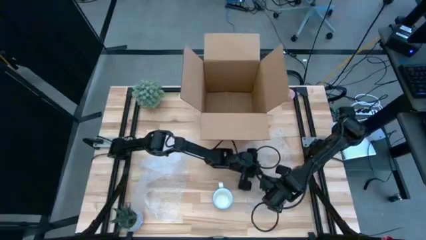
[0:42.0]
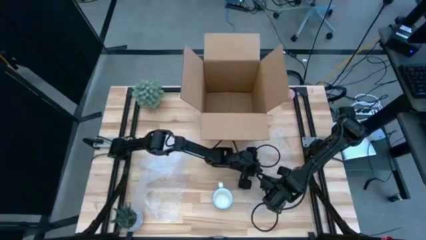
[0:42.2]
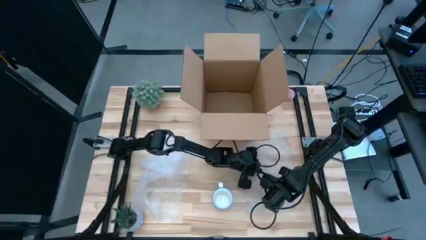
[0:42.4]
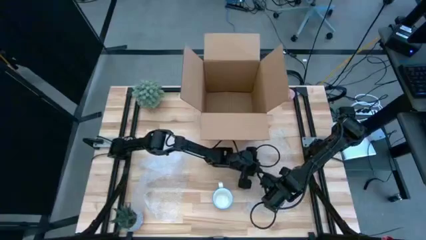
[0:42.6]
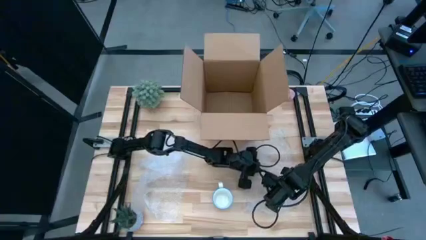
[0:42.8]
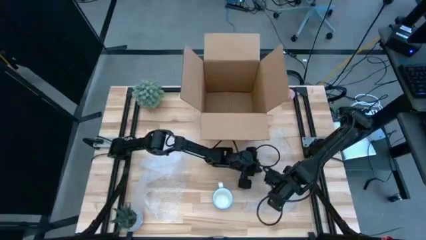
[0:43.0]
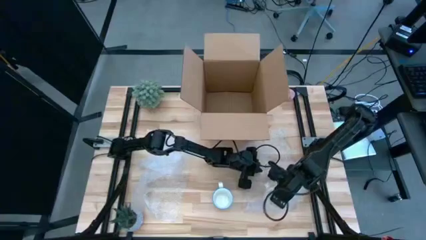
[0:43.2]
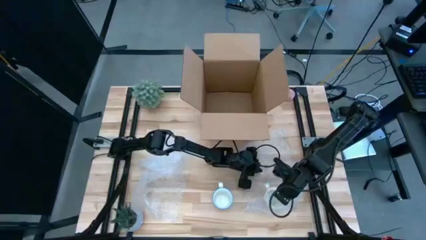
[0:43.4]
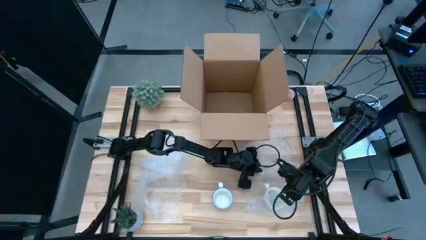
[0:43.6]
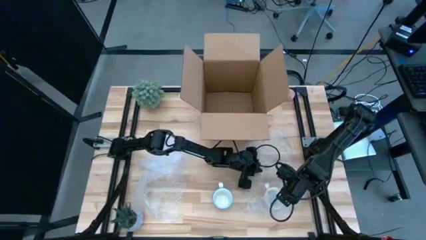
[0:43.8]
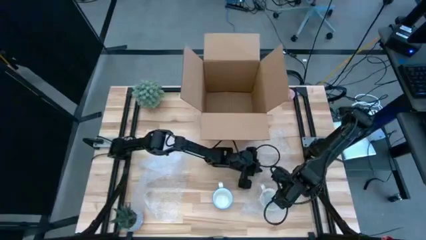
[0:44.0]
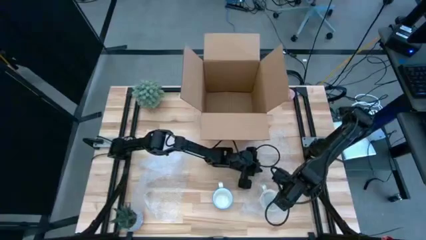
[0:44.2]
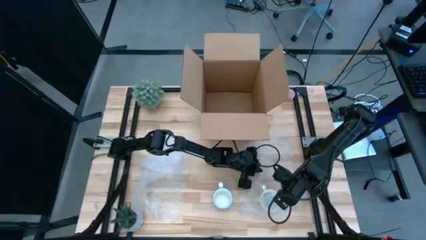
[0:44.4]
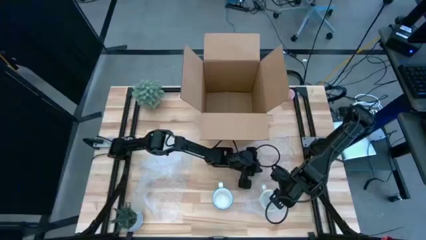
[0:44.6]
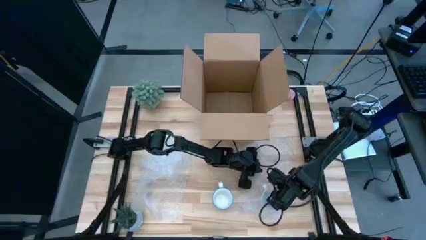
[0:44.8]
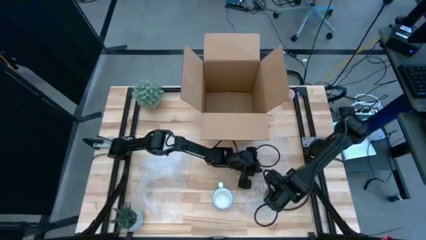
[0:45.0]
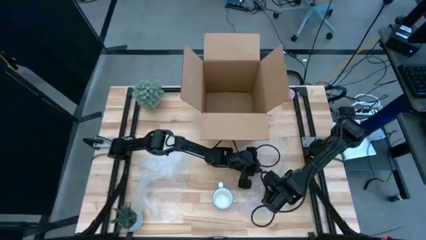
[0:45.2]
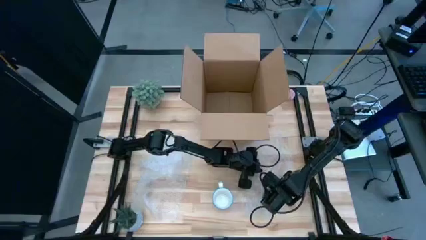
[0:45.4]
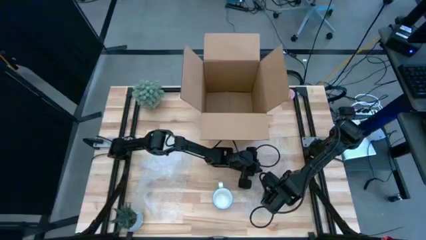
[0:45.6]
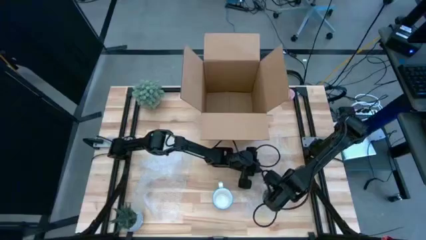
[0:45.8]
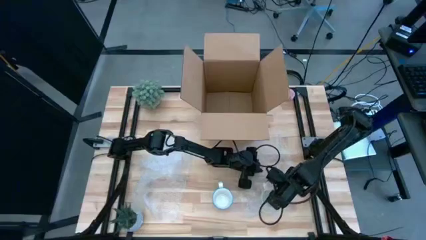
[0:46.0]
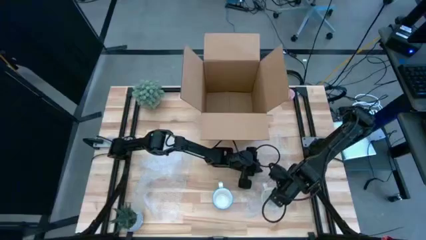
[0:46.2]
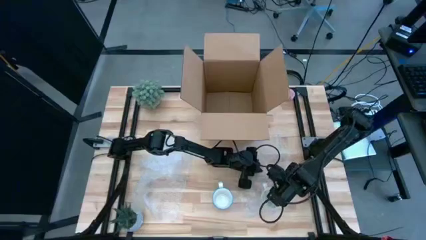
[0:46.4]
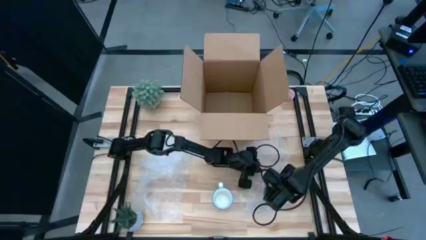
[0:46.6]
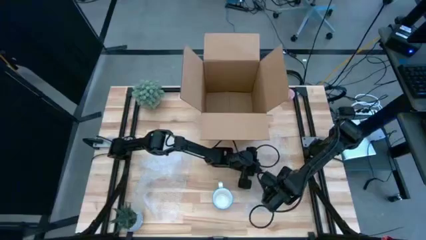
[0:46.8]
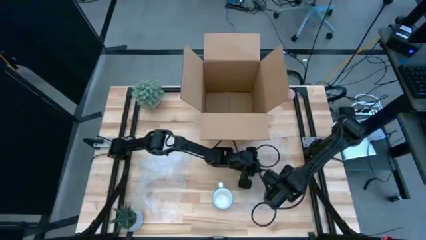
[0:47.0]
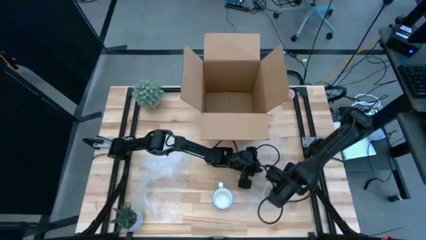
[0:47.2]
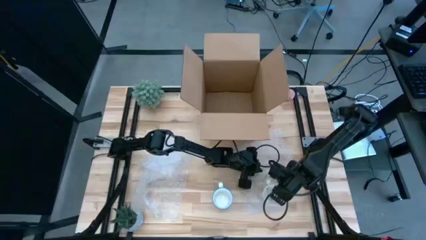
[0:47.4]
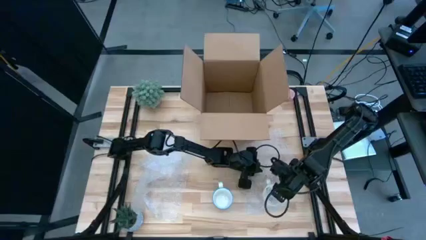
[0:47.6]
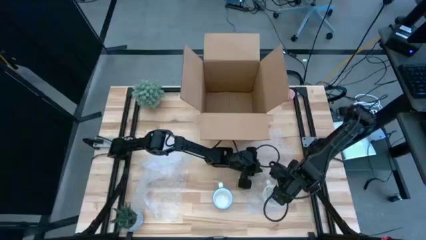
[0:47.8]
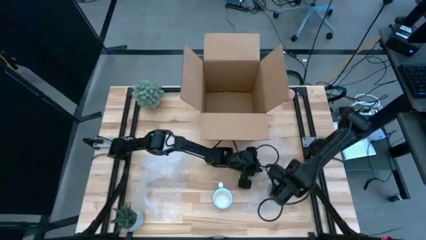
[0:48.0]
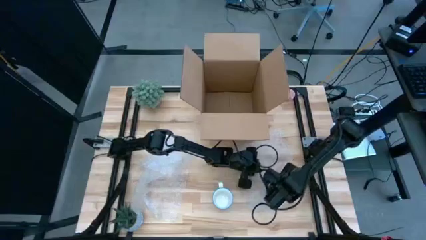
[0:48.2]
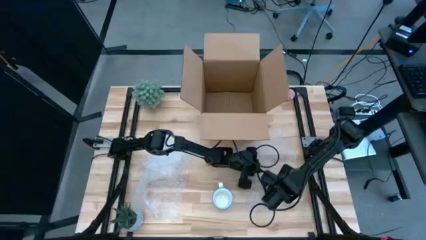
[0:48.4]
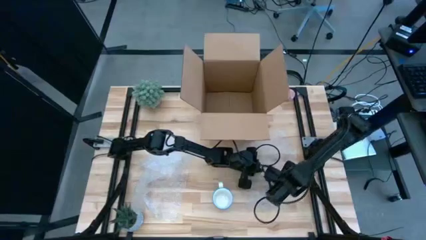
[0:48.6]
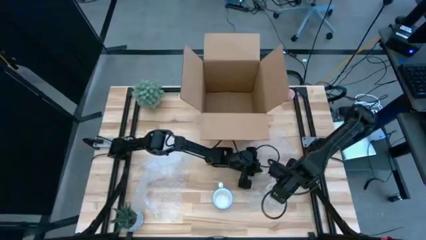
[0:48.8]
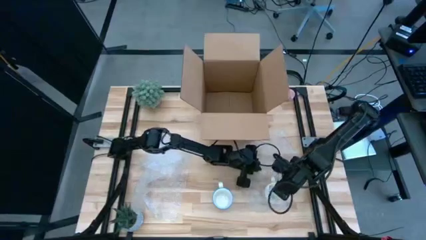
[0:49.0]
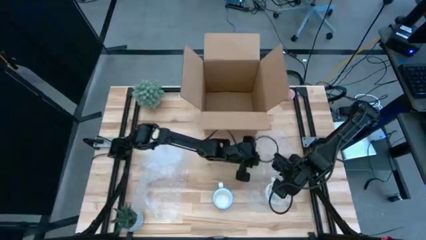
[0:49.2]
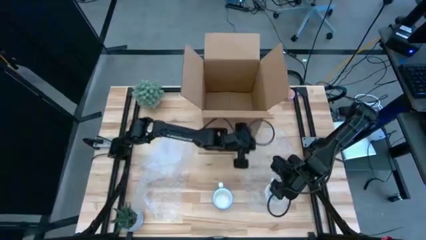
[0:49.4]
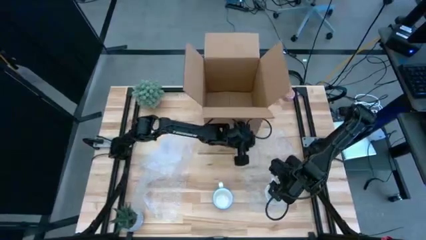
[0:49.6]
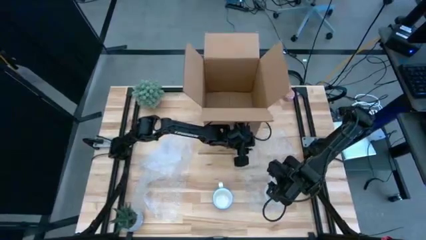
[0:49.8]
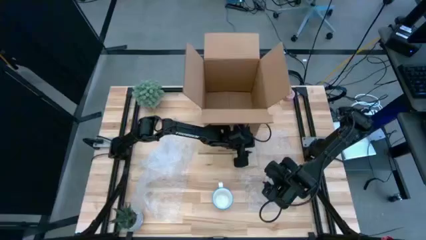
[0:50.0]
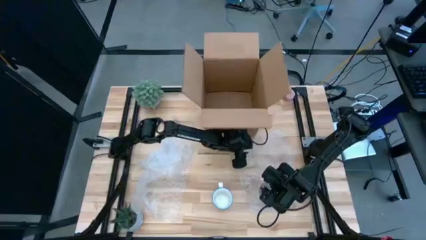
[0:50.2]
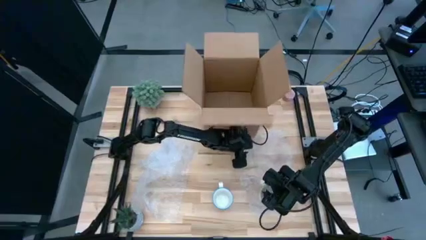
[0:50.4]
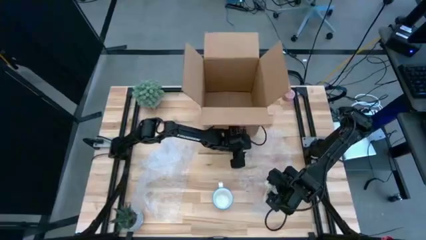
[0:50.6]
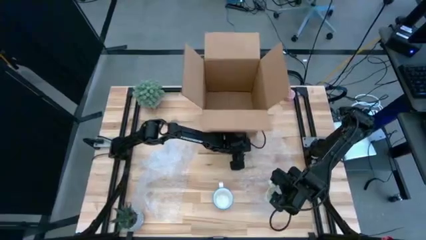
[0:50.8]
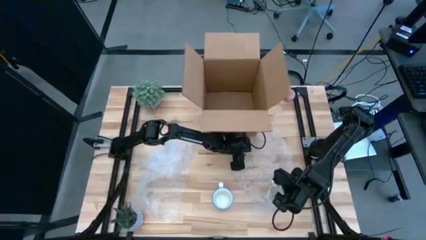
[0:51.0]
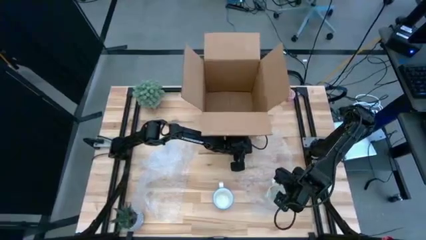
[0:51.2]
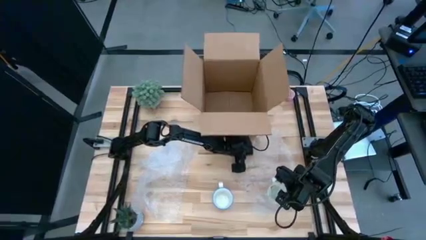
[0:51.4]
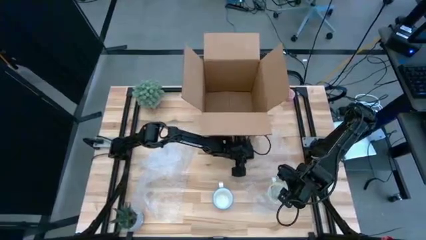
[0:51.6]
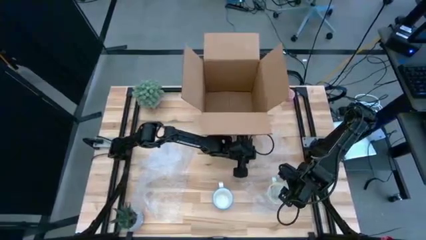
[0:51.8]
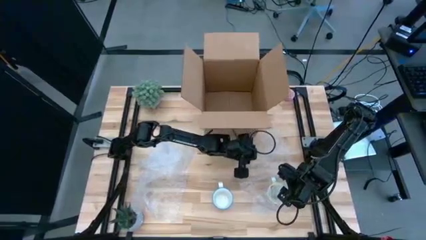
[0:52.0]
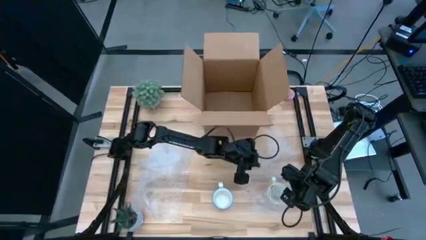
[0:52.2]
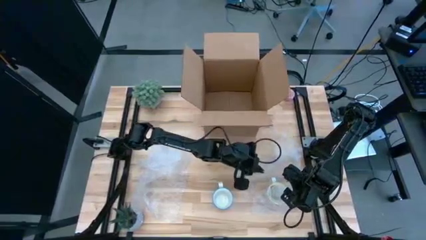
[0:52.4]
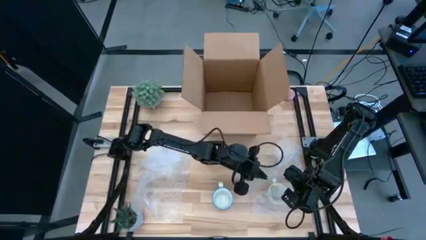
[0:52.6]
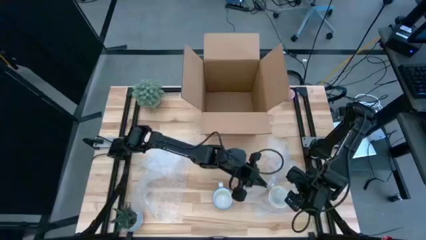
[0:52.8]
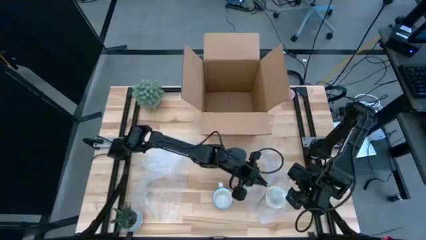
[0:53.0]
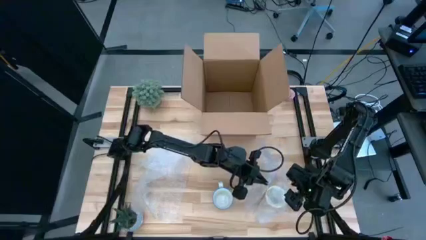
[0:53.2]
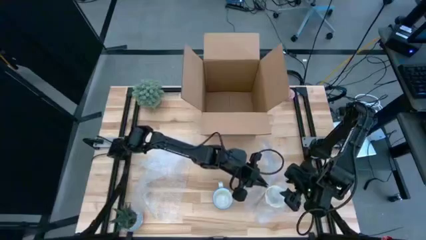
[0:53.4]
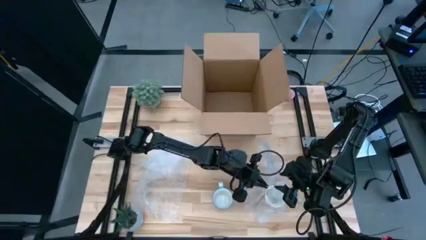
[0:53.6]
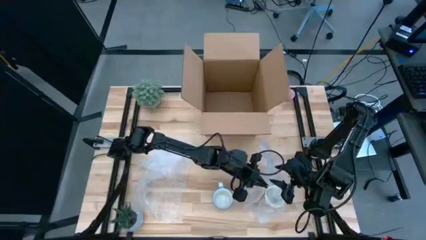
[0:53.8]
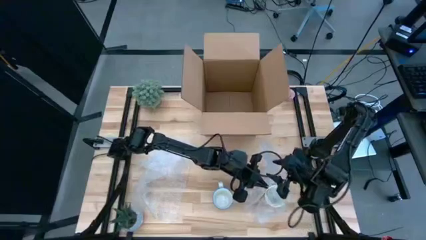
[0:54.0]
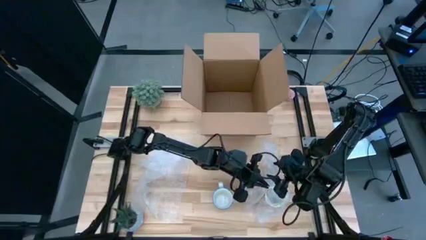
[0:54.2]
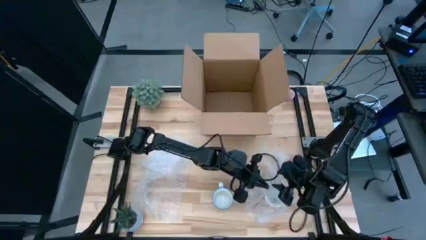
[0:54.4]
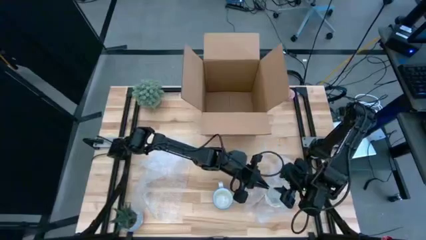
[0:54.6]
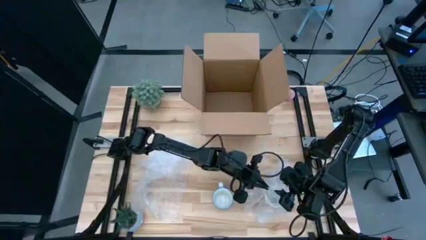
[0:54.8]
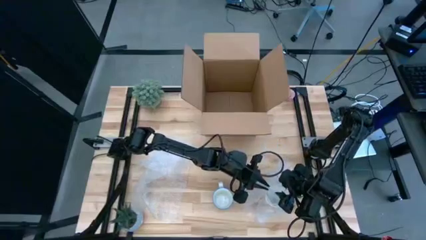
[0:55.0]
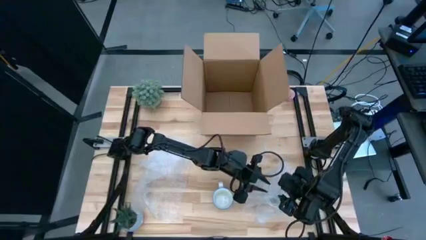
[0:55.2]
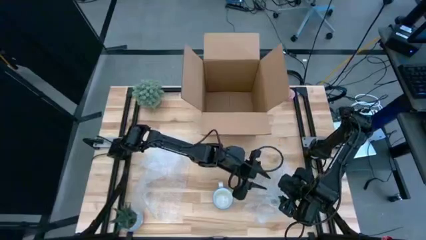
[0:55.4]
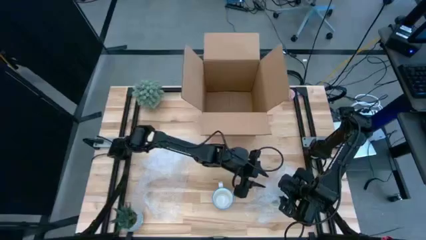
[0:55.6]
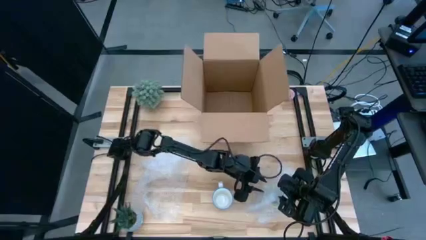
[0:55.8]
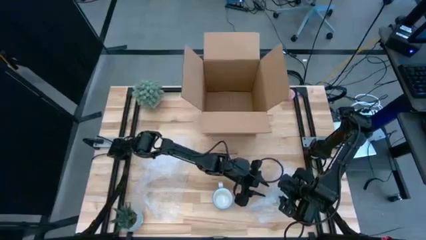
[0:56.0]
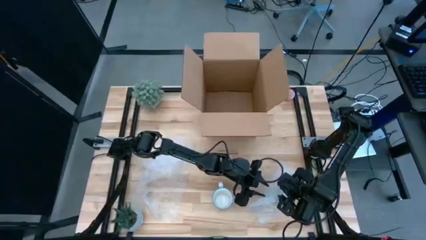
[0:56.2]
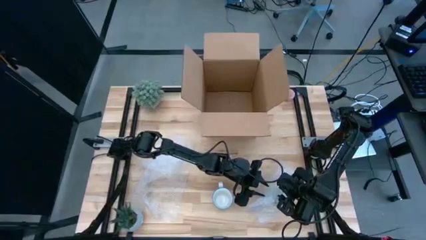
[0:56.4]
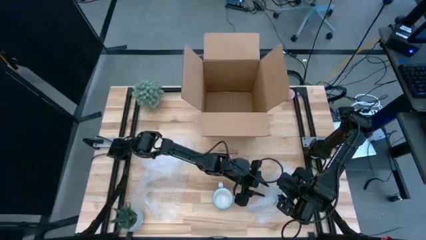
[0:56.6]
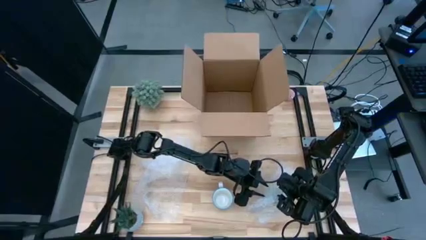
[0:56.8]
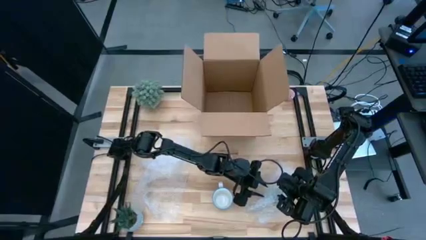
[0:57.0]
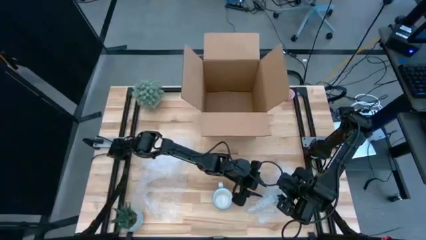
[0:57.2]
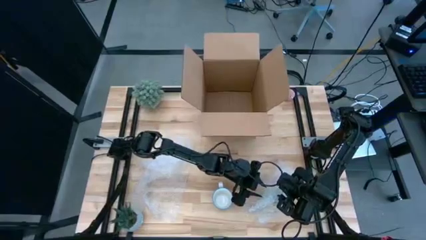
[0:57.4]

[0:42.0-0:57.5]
Task: wrap mug
Wrap the yellow mug with the bubble wrap
